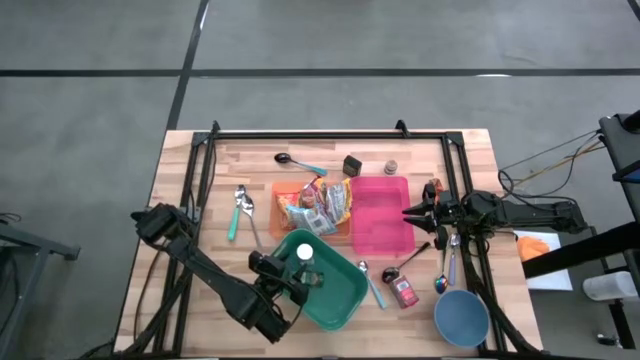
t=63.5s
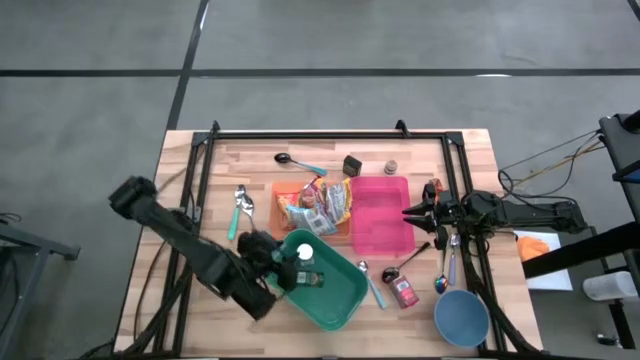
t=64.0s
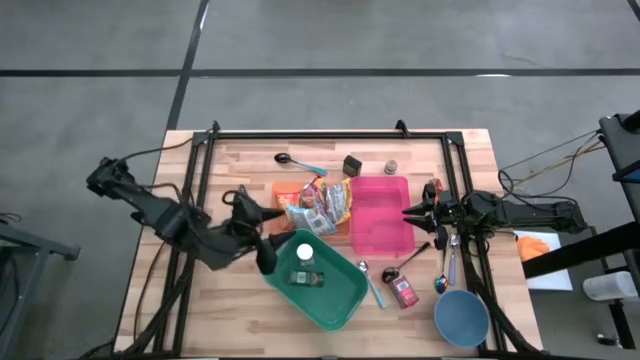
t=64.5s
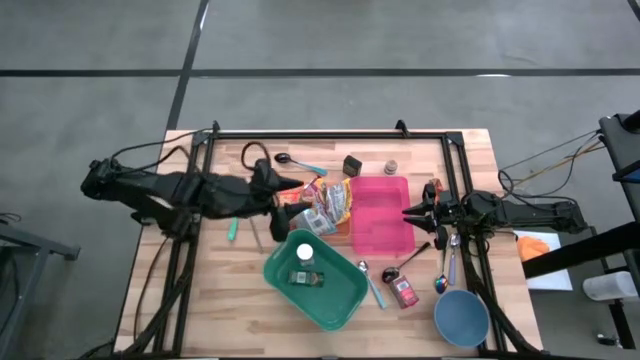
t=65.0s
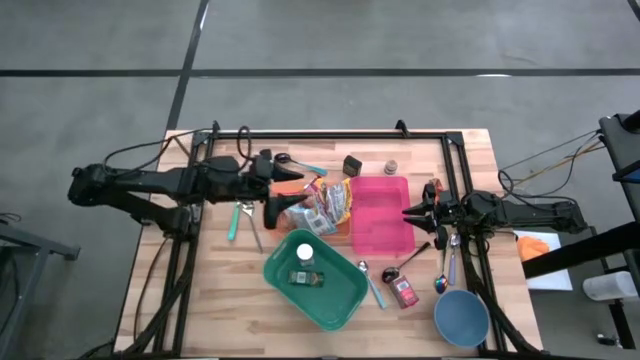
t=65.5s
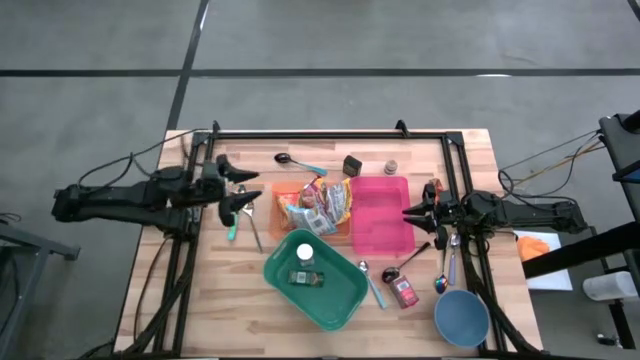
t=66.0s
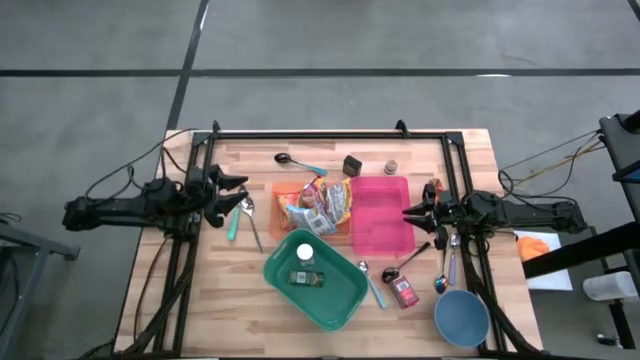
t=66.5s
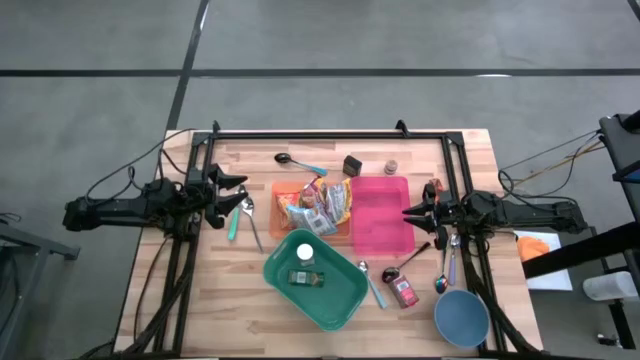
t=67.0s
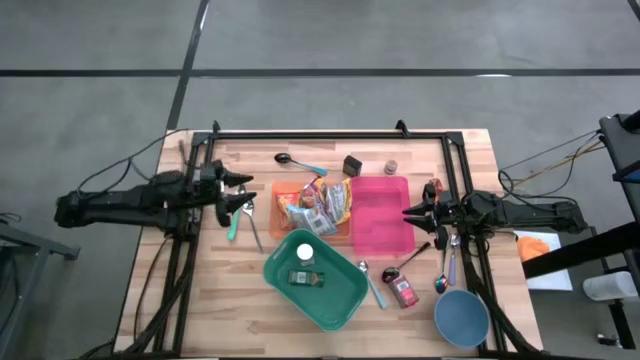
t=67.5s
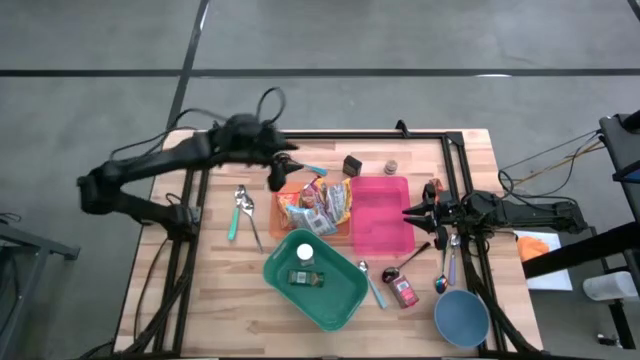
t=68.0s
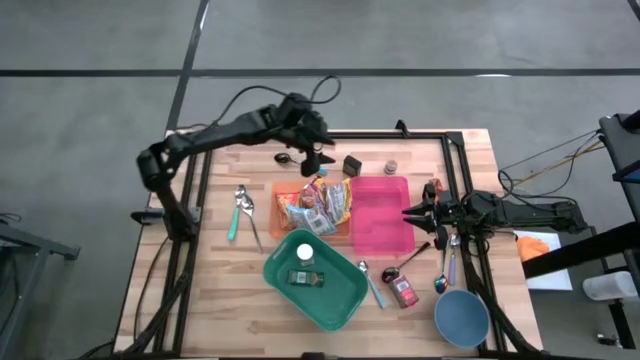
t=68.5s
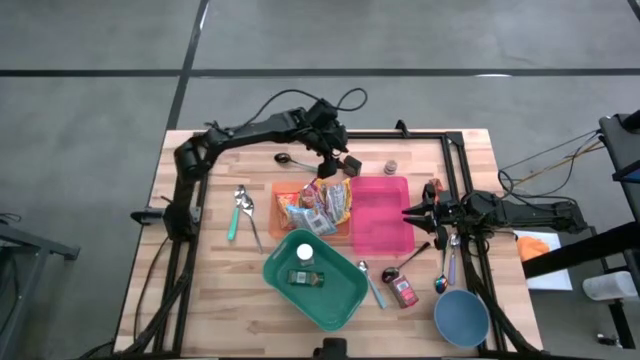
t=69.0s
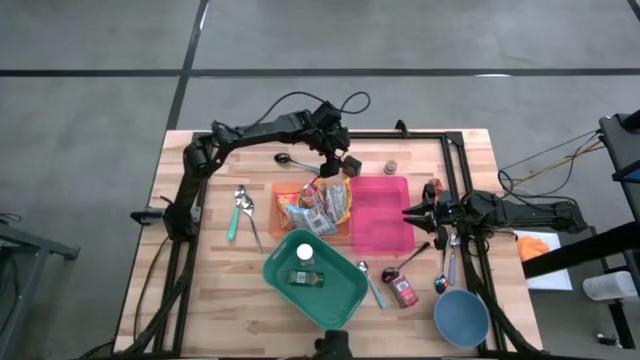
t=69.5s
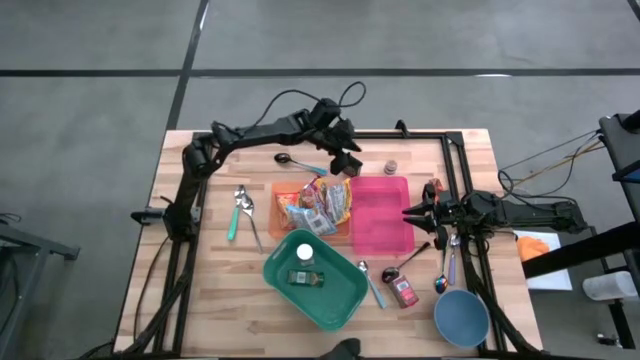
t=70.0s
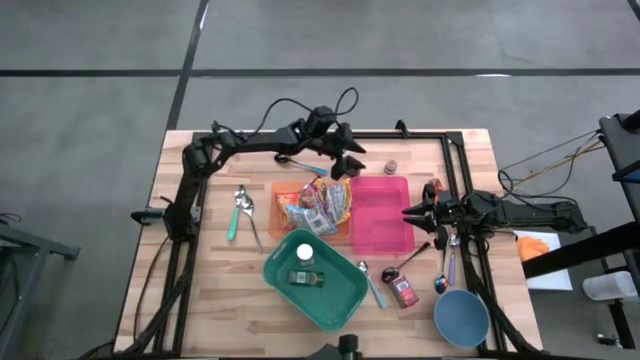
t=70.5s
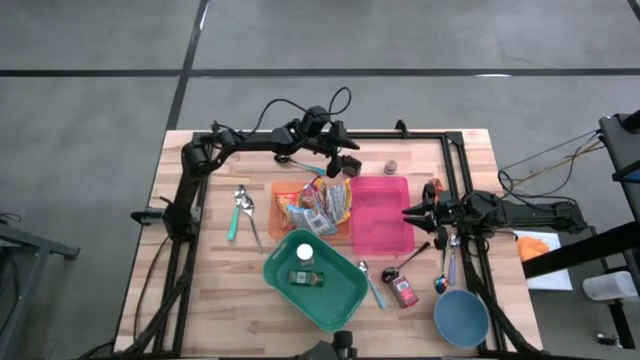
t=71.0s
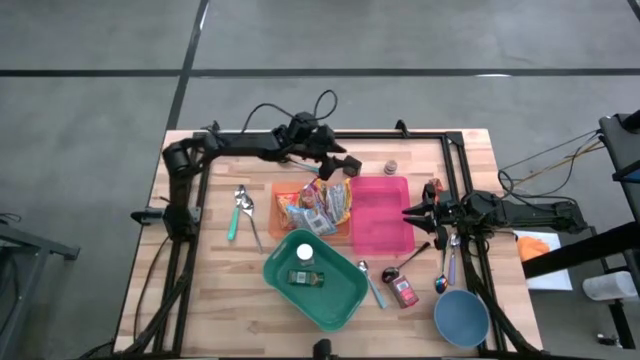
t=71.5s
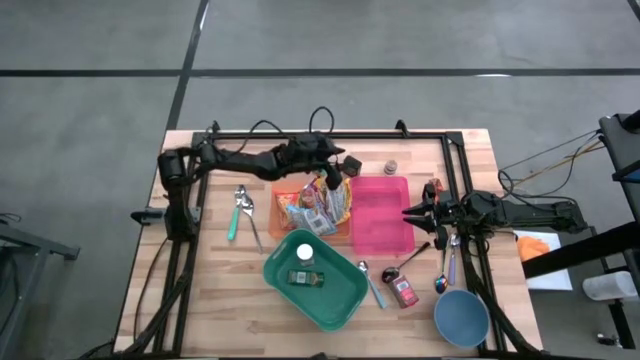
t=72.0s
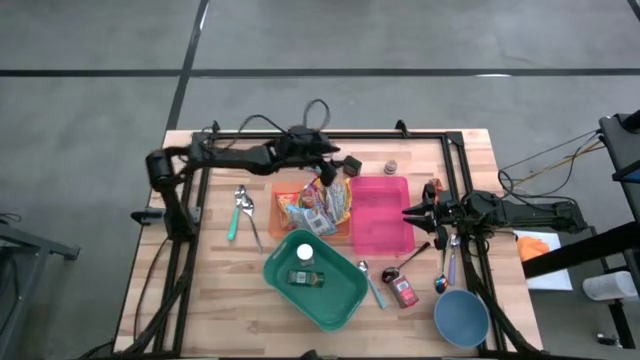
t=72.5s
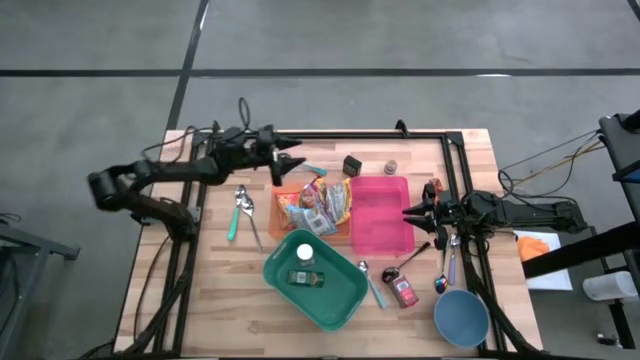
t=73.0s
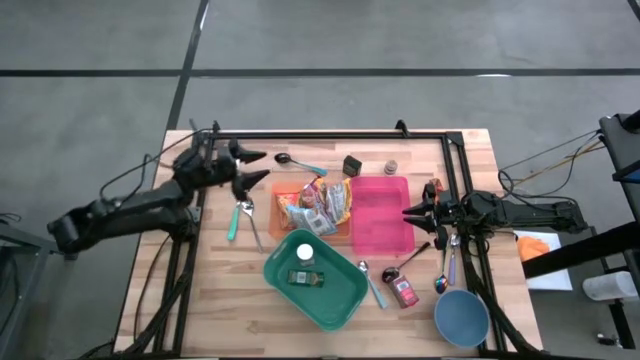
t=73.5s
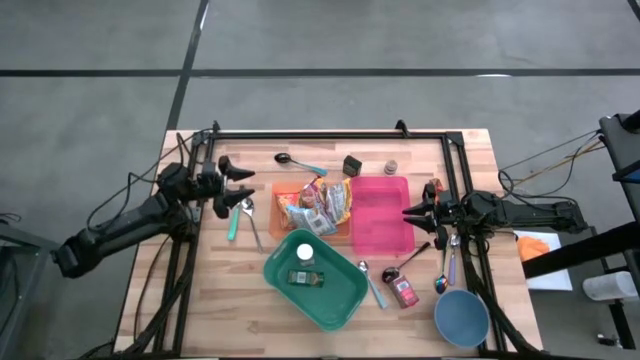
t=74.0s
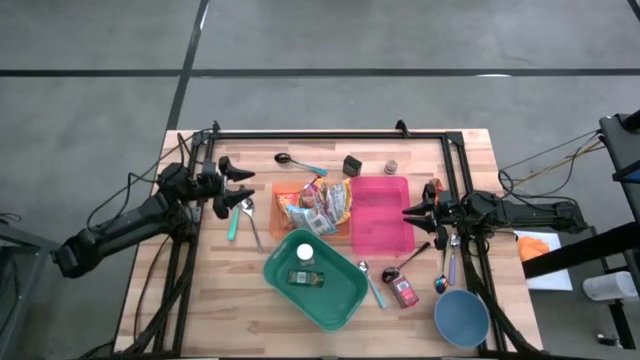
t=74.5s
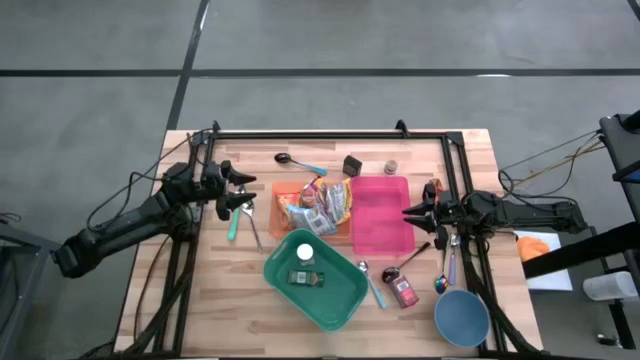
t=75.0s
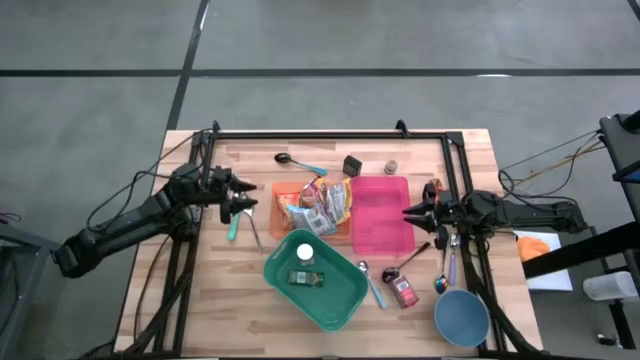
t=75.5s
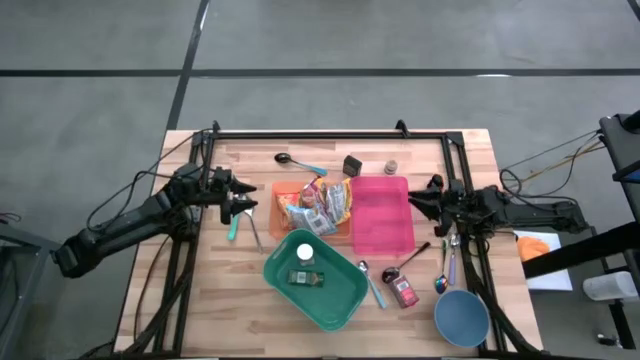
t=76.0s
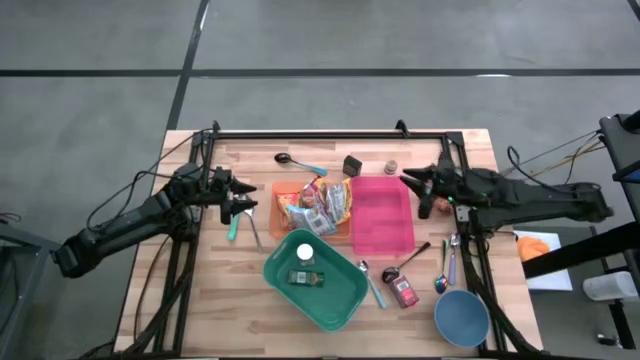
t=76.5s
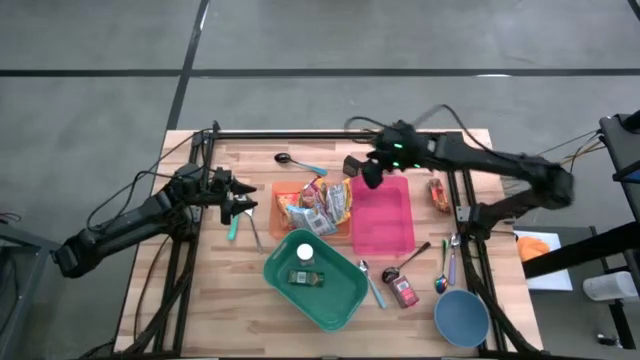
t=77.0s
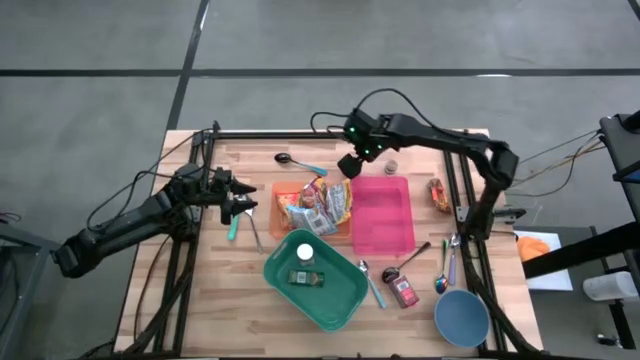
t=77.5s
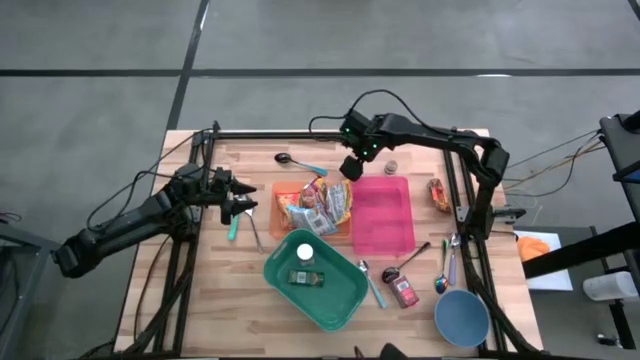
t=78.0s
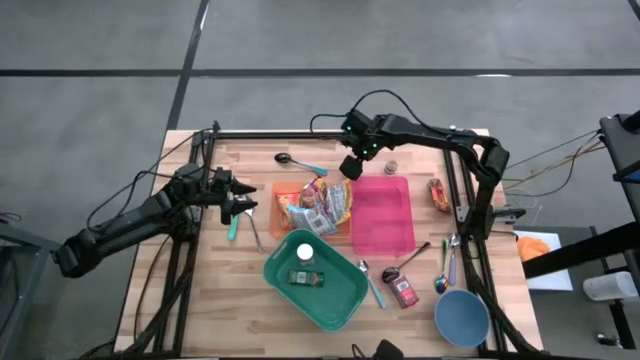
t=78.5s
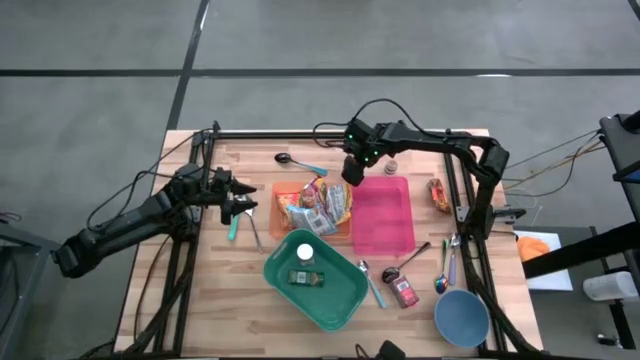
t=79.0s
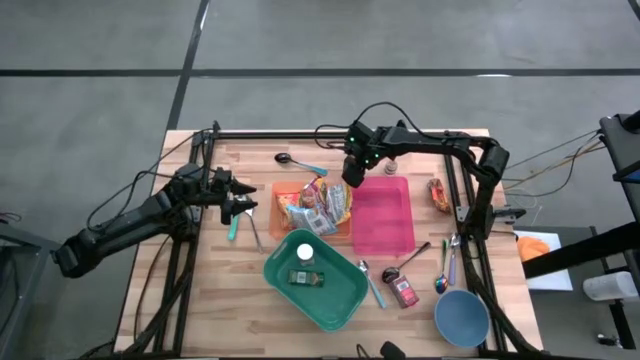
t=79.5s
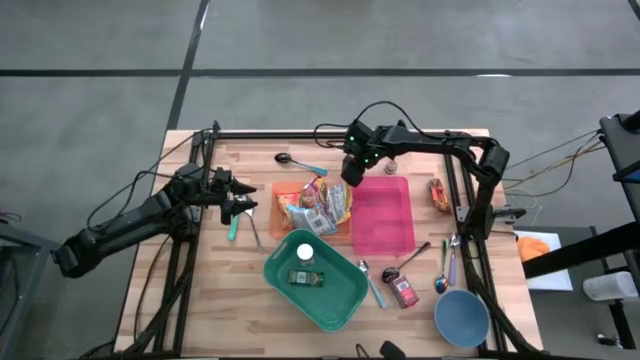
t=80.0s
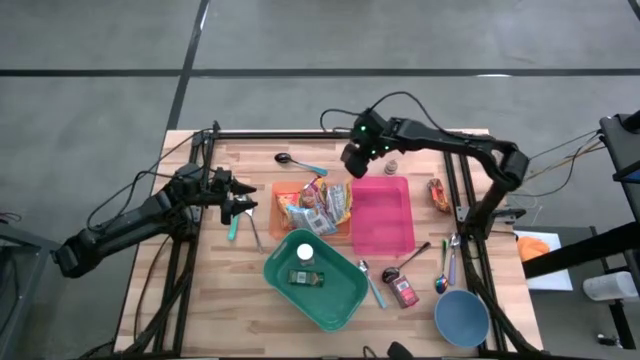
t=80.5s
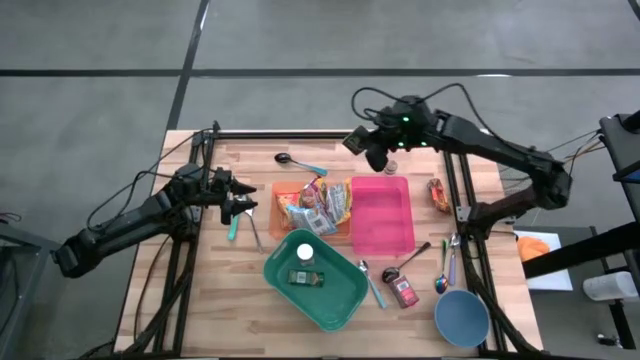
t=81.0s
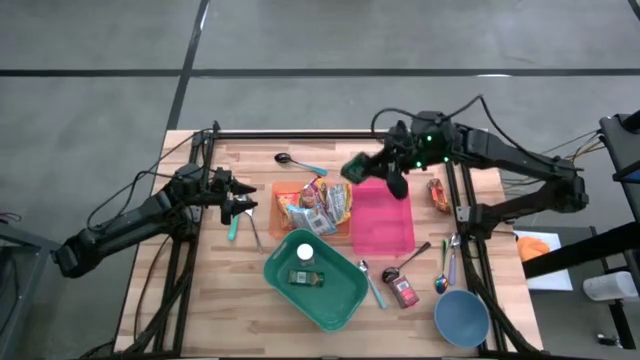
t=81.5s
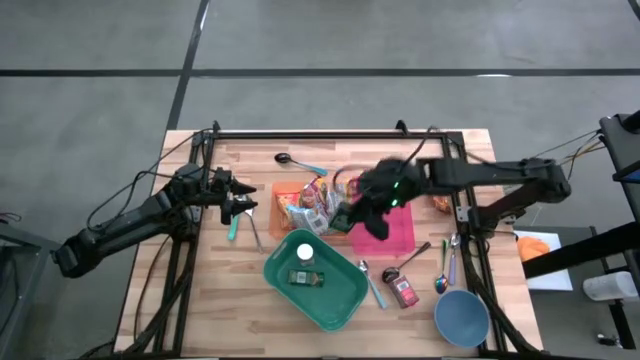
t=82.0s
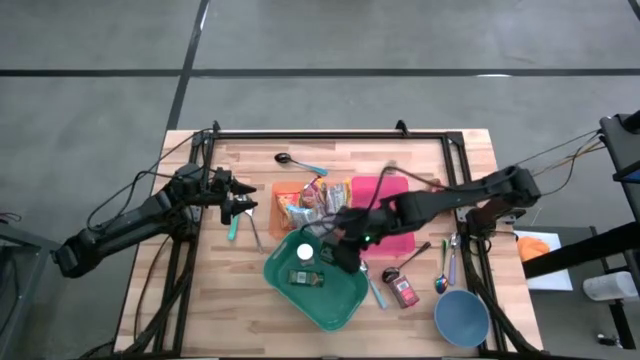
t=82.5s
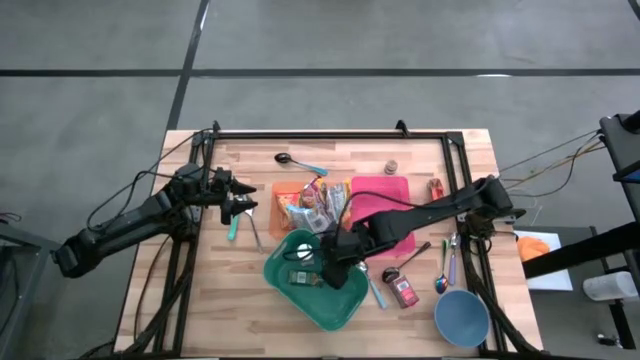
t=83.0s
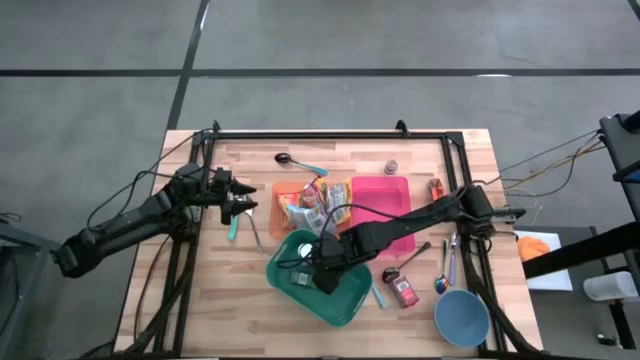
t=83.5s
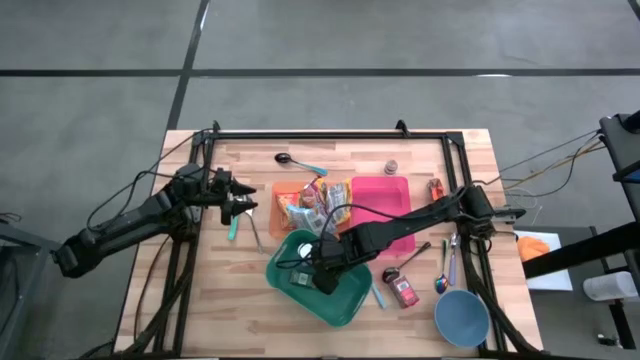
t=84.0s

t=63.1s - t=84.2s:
Put the green seasoning can into the green bin
